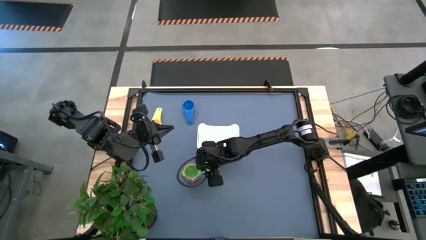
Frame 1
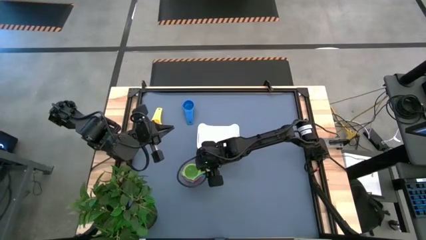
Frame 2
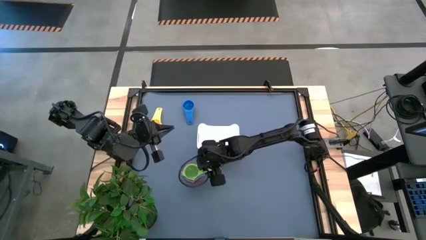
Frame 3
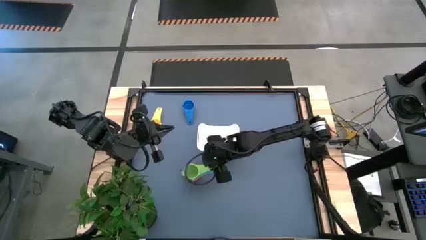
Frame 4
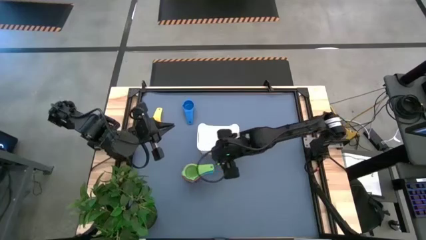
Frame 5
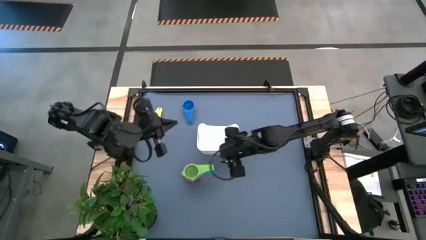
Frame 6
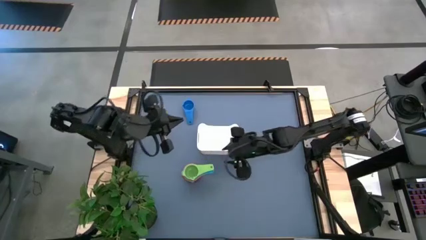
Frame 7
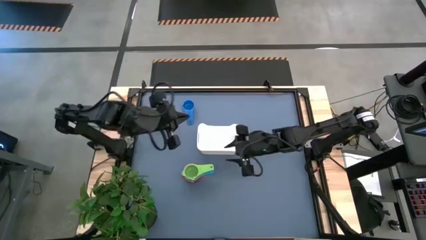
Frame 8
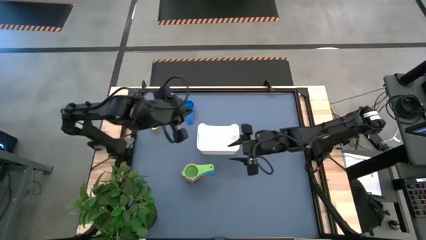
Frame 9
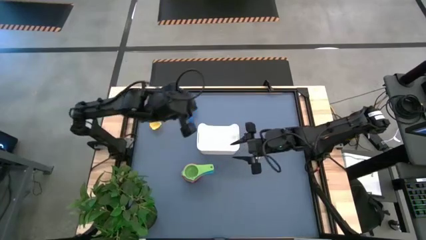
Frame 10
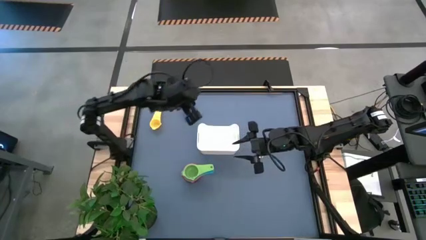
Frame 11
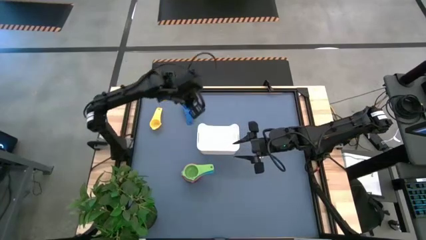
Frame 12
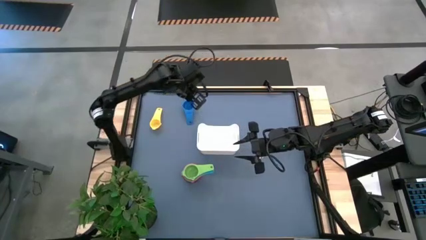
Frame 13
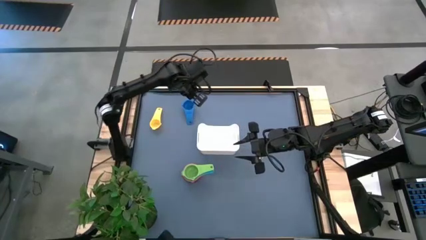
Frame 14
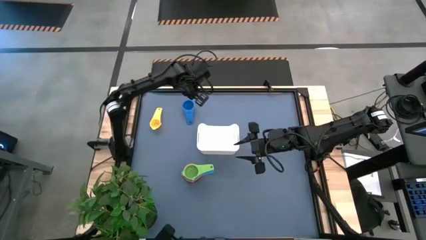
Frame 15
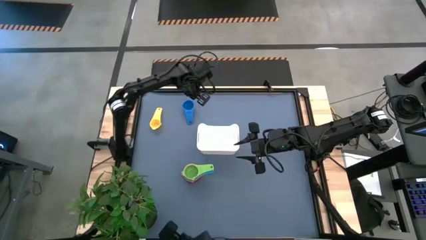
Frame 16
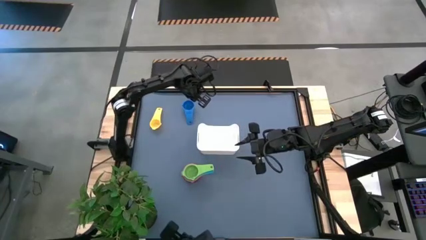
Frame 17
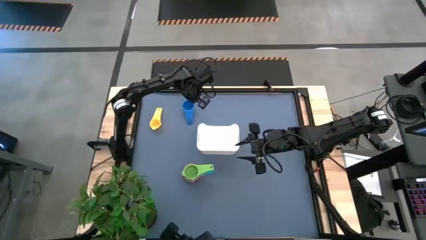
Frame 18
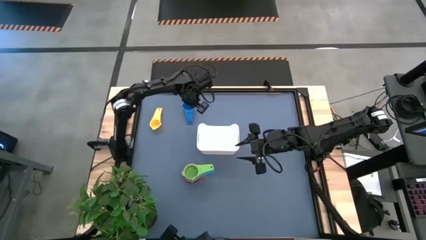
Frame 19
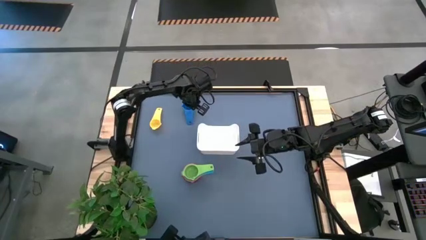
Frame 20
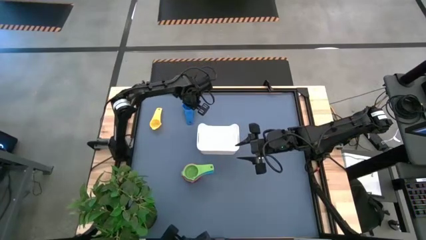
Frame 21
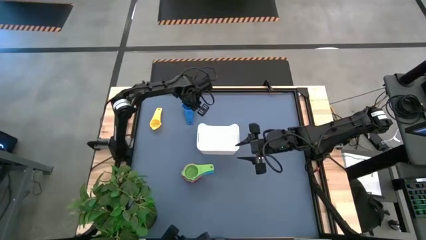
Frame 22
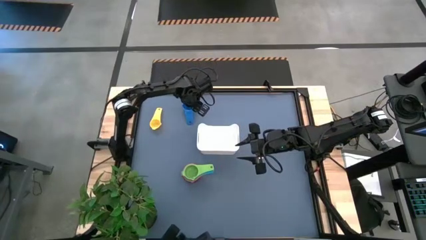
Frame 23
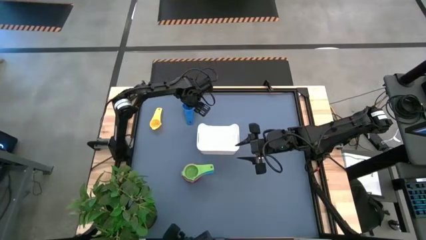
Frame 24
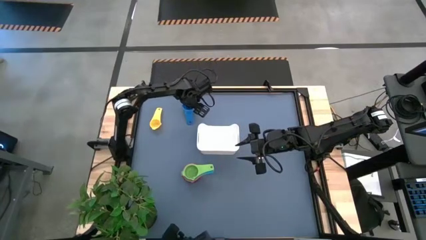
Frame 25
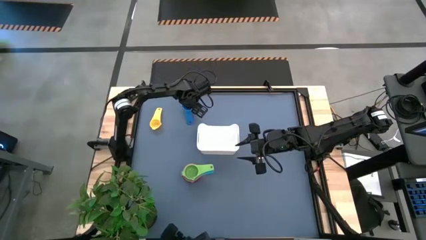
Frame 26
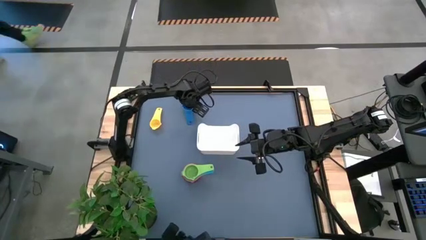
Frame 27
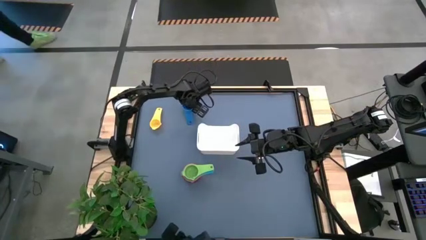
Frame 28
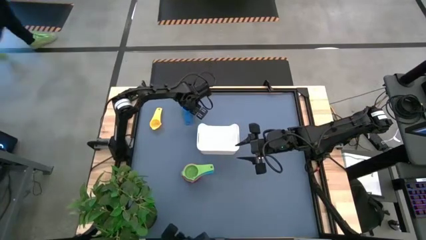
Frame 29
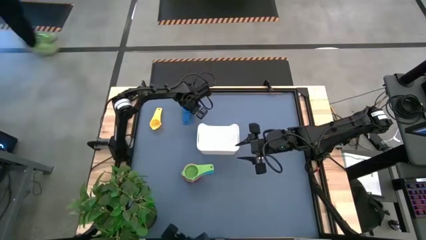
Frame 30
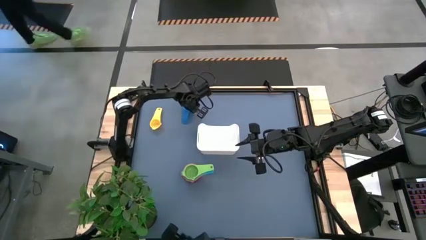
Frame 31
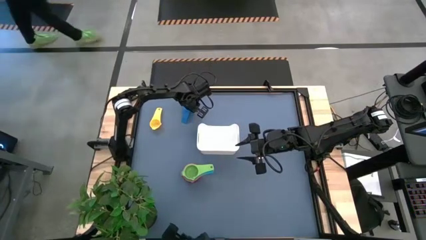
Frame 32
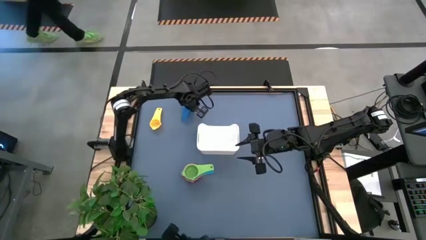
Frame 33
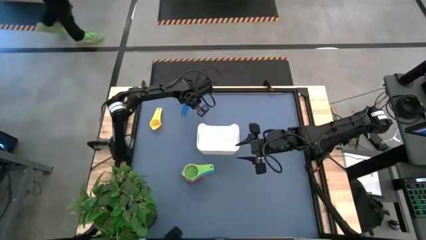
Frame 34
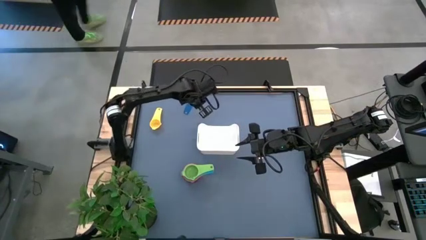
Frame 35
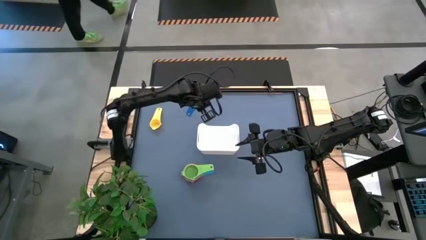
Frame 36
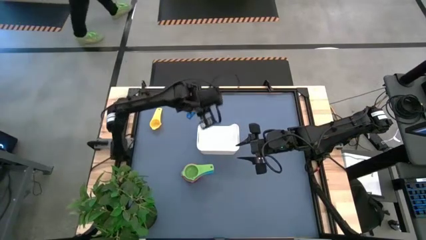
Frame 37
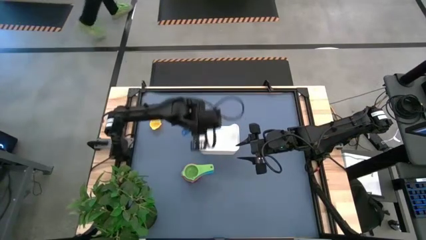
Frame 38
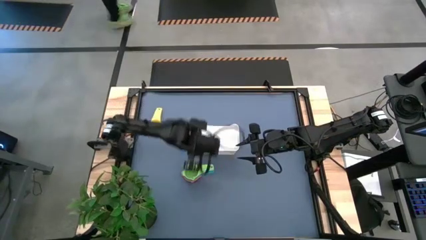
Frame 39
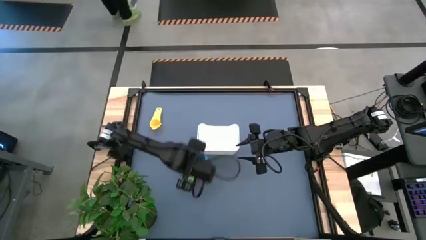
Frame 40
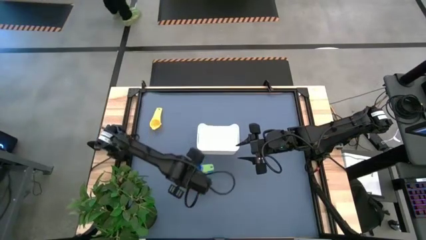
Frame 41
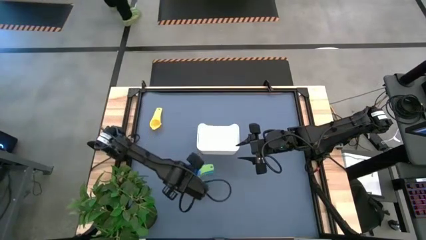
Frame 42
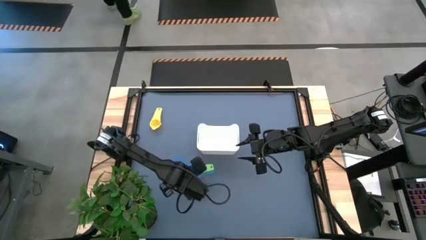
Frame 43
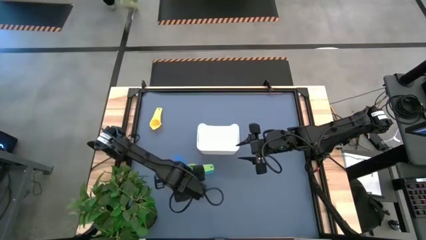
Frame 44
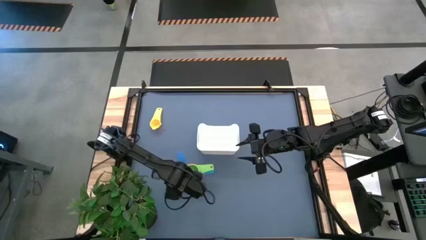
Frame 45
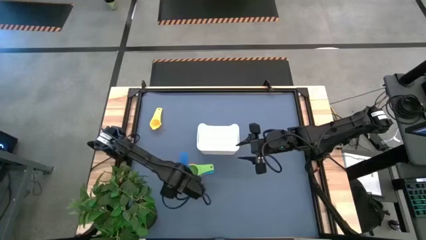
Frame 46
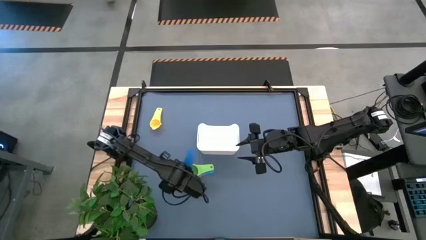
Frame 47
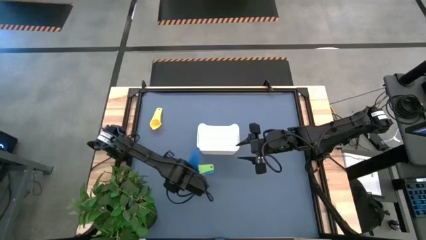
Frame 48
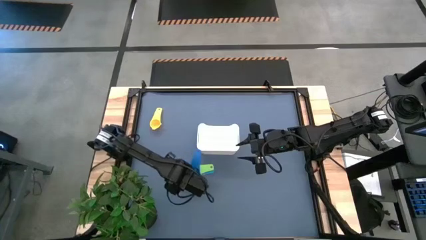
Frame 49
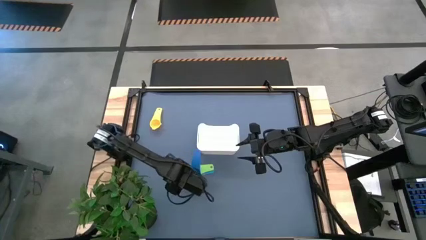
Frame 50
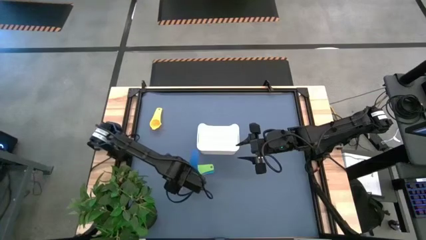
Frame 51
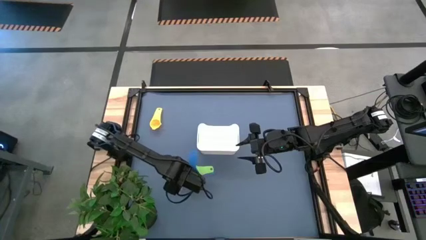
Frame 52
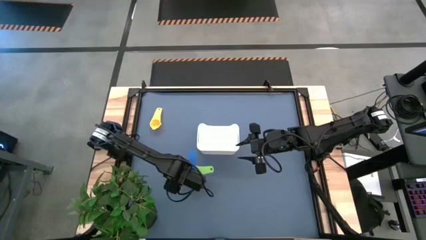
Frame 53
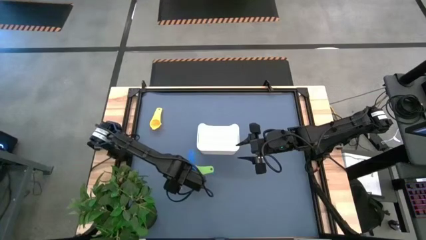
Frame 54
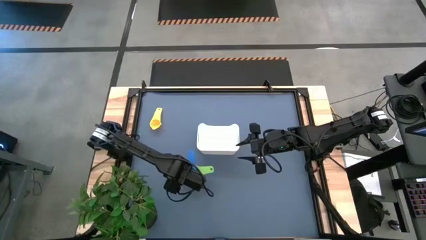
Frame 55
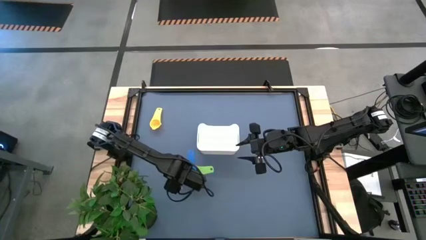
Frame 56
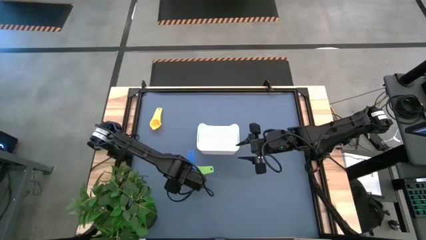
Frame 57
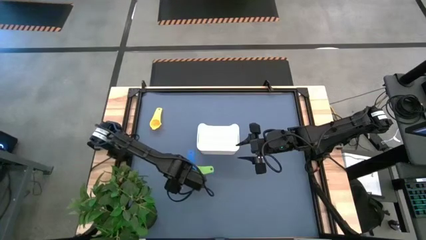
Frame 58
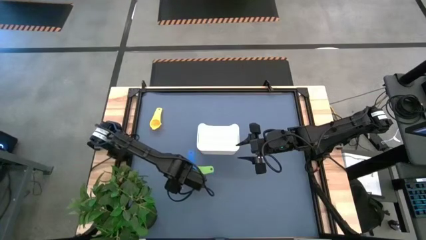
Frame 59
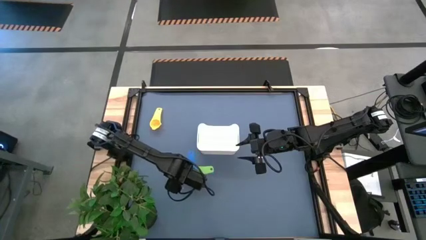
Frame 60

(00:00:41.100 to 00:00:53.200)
Task: Nest measuring cups in basket
Stack the dark blue measuring cup on the green measuring cup

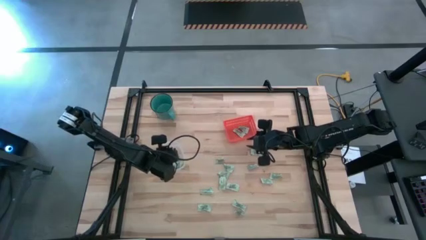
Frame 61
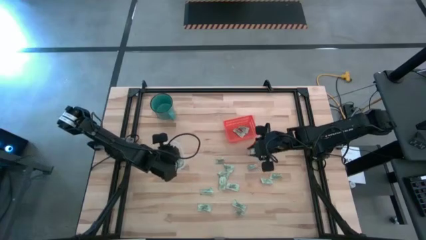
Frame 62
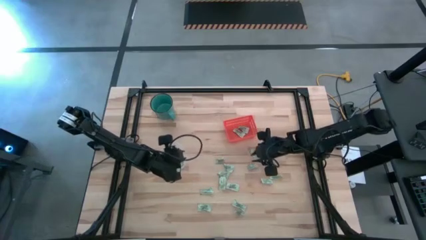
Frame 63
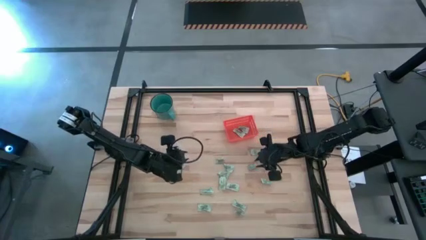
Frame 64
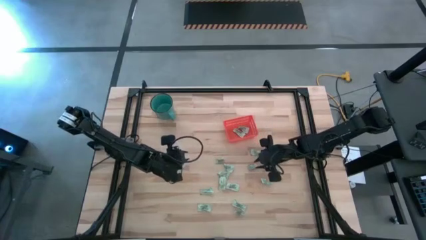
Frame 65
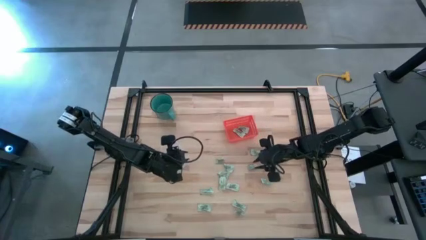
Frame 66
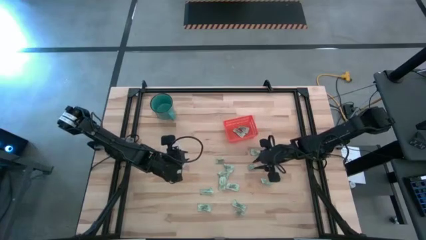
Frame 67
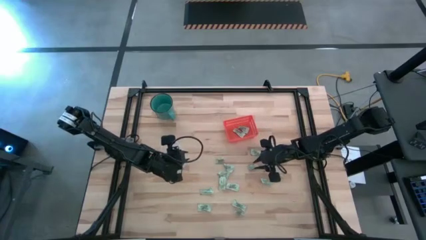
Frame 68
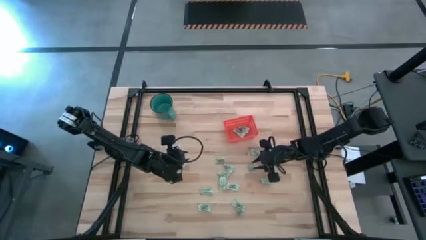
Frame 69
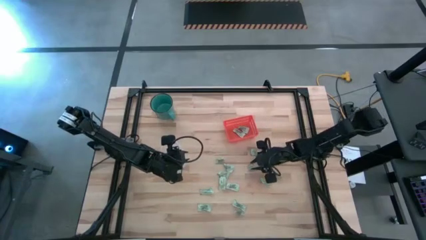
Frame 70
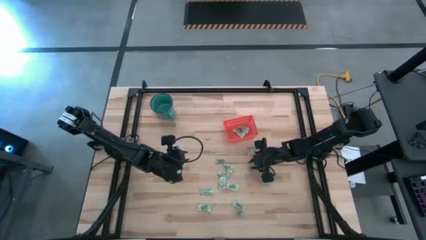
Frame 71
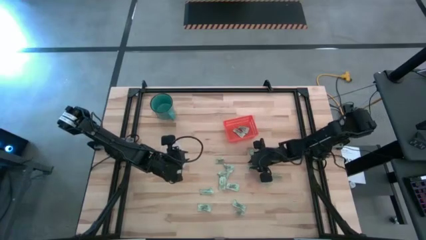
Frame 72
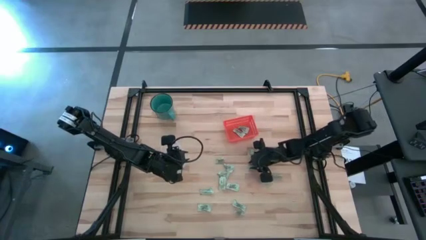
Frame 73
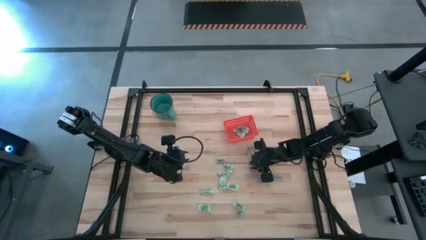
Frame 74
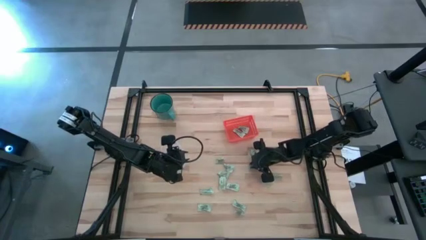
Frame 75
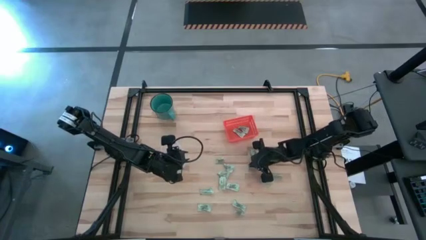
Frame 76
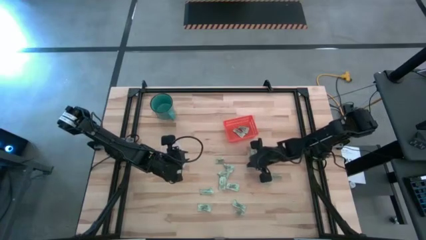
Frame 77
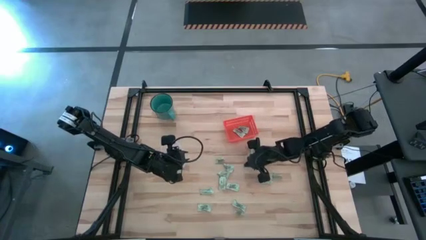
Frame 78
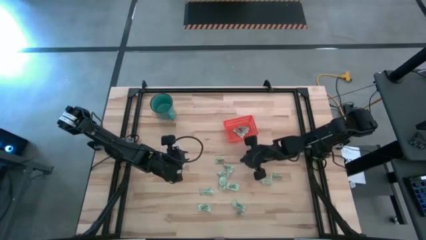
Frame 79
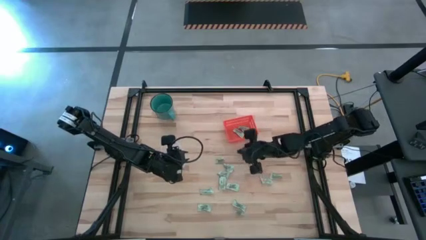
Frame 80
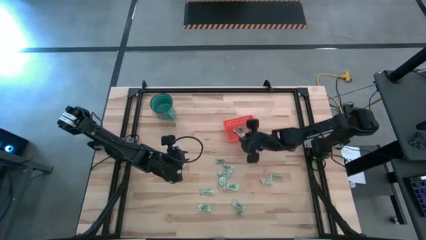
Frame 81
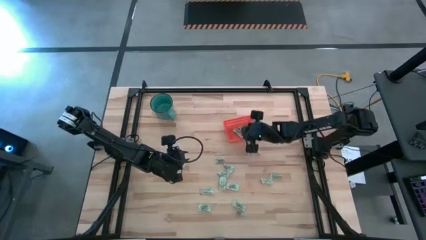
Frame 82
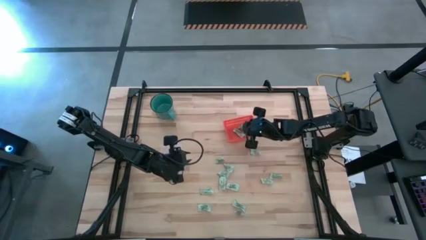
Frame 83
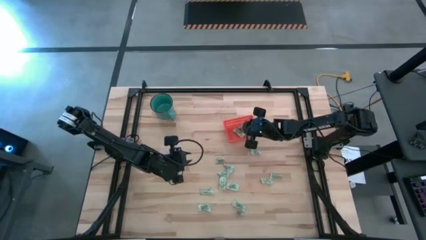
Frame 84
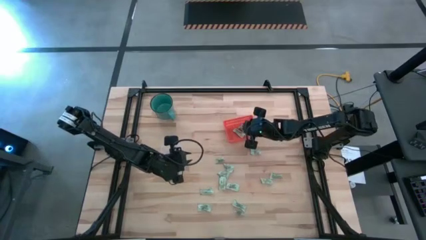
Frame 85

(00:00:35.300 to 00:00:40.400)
Task: Pick and place items into bin
Put the light green stevia packet into the orange bin
